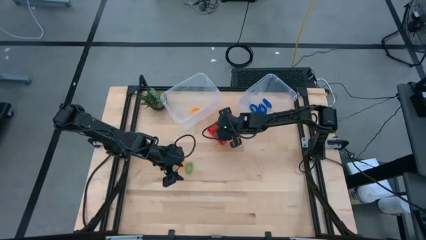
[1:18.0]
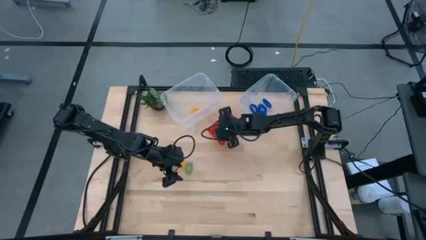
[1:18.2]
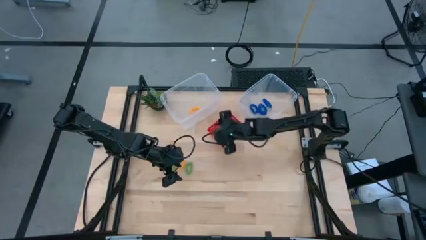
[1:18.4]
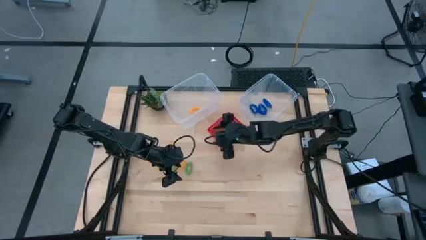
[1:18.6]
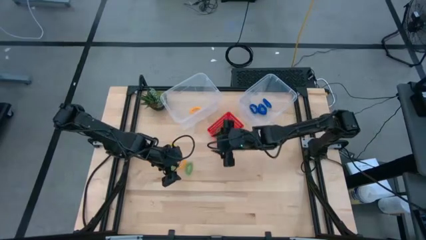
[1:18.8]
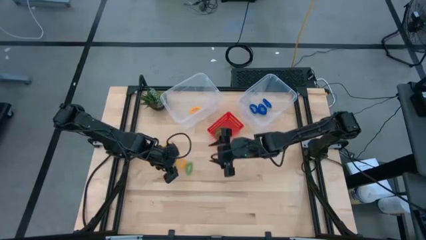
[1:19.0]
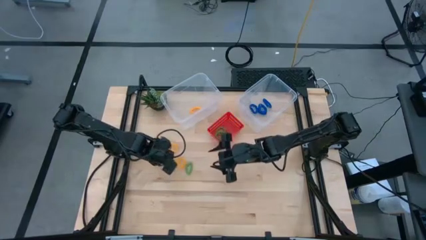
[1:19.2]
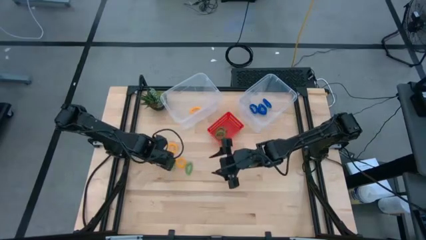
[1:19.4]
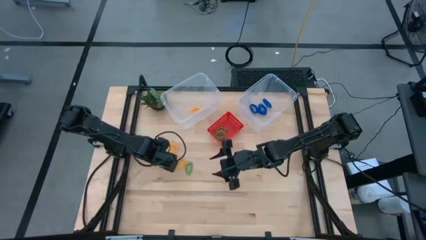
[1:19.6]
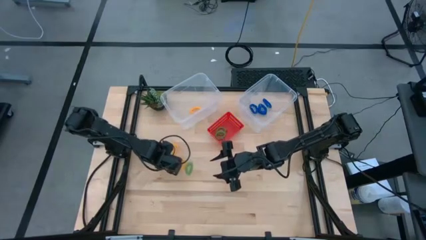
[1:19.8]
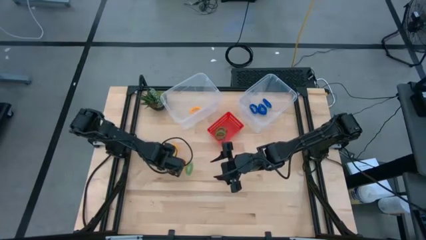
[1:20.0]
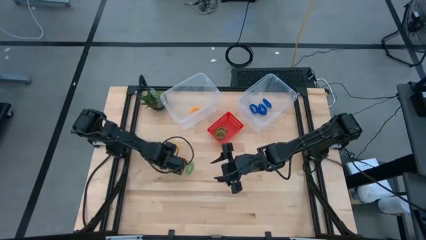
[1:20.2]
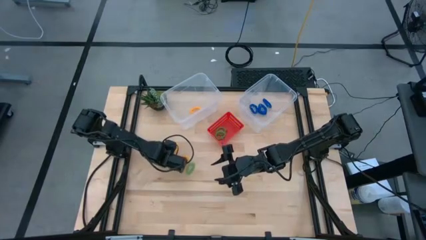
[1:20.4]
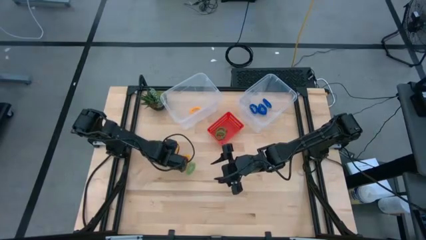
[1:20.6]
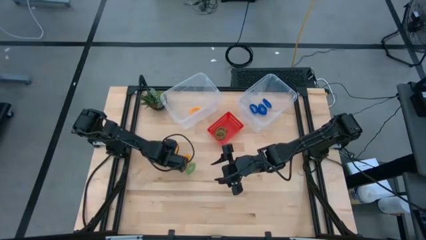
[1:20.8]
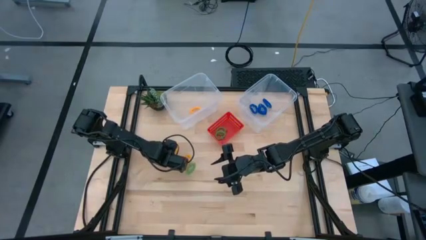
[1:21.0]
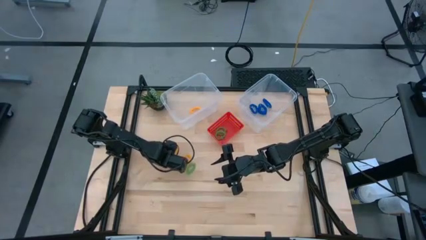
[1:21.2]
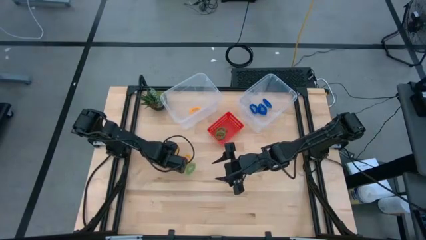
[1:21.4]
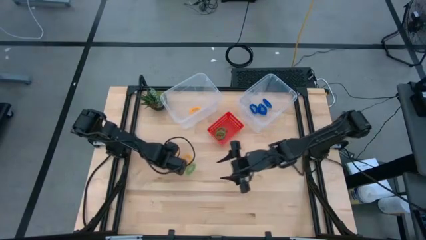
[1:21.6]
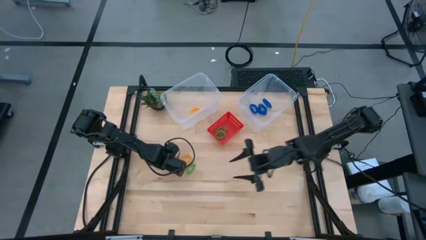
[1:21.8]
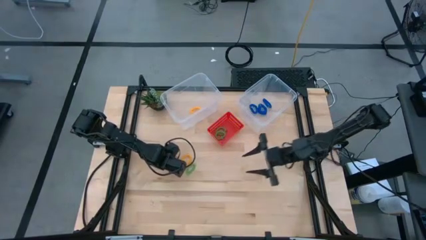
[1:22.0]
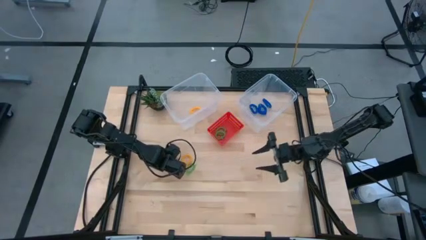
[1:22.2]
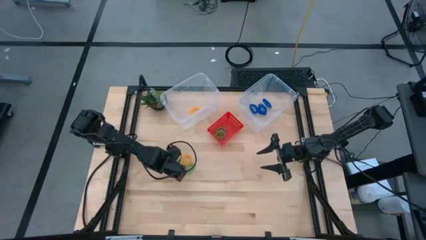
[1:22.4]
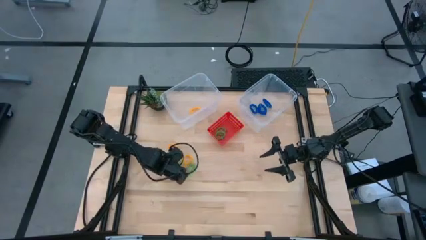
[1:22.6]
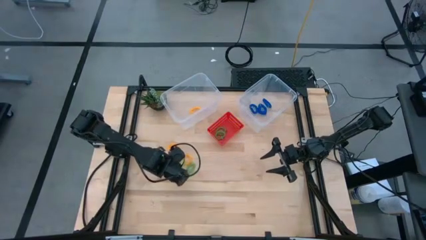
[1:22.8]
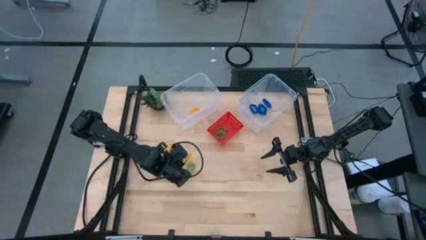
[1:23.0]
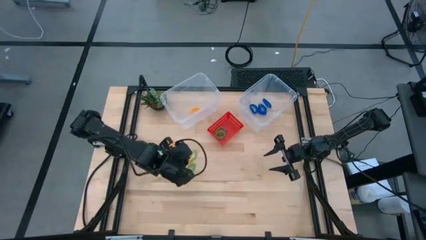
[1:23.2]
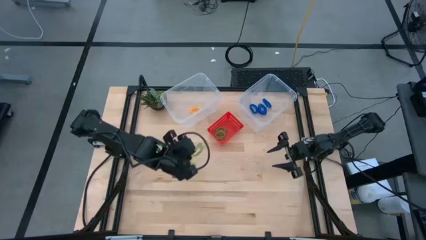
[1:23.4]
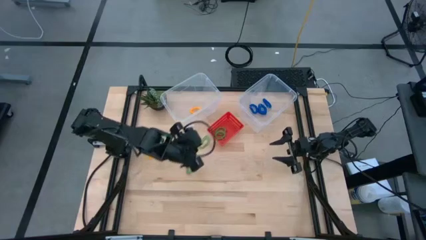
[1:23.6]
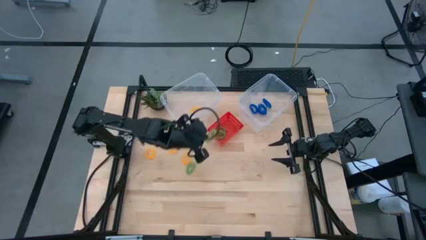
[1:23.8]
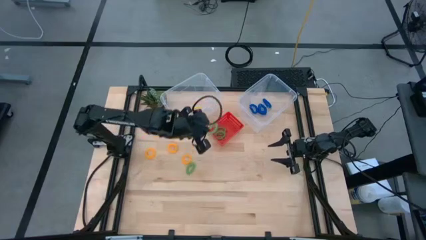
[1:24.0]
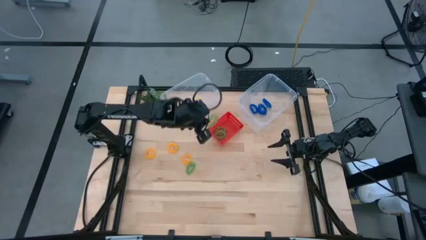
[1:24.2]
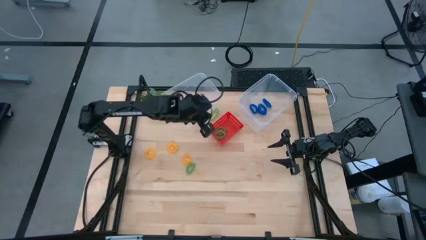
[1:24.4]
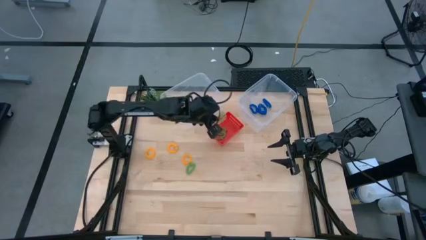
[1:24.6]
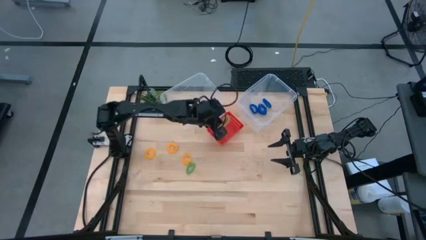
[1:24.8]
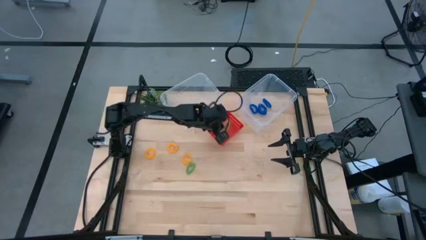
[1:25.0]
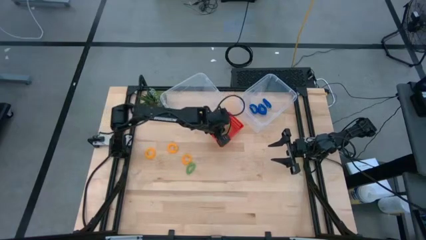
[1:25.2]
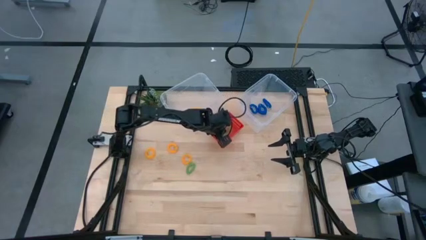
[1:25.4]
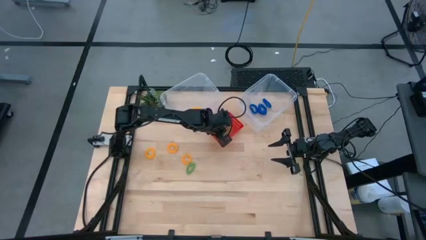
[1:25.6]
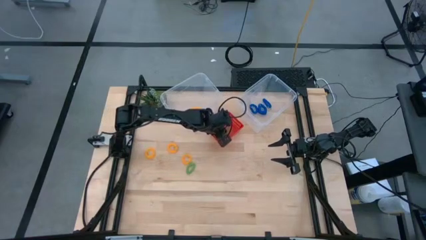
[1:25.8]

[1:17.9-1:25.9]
Task: Sort spring keychains
Put the green spring keychain into the red bin

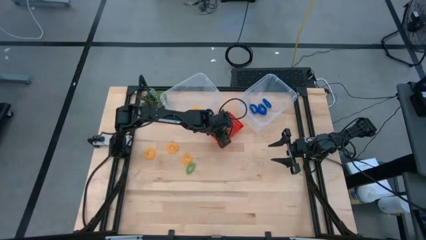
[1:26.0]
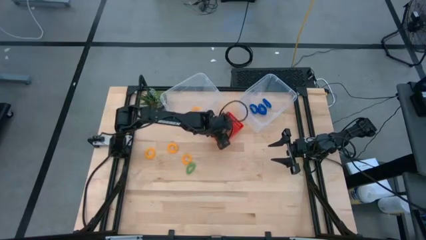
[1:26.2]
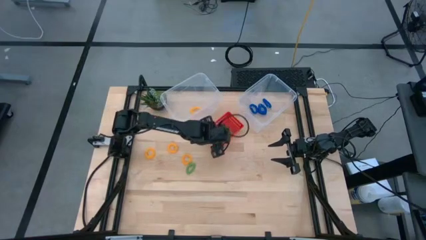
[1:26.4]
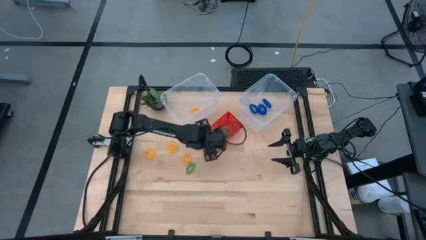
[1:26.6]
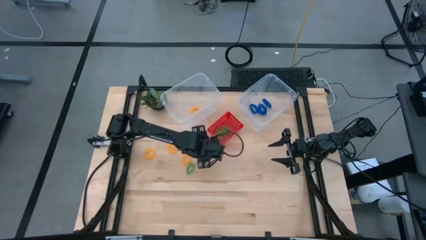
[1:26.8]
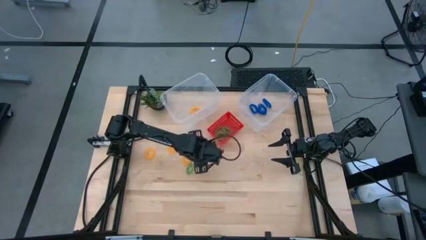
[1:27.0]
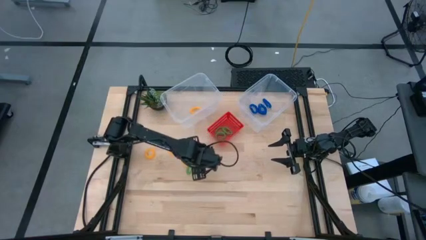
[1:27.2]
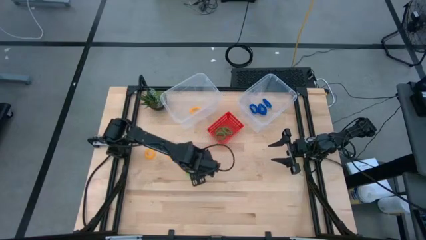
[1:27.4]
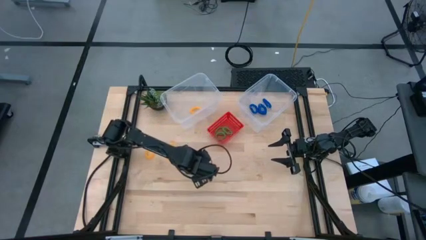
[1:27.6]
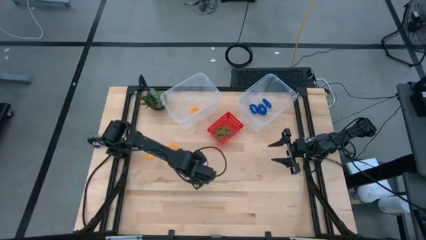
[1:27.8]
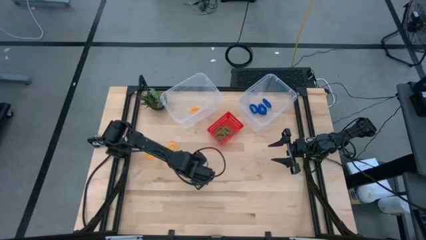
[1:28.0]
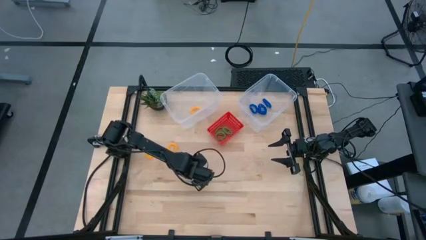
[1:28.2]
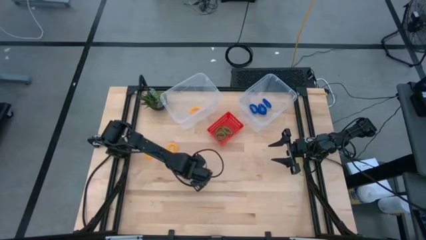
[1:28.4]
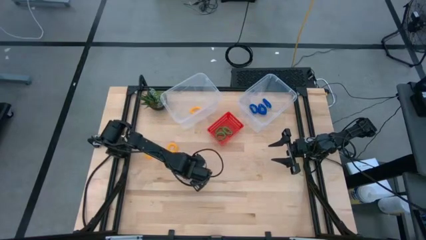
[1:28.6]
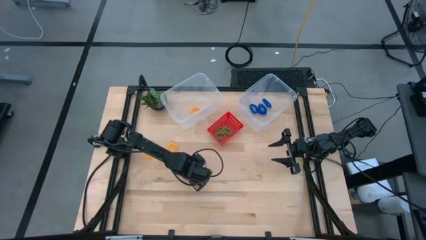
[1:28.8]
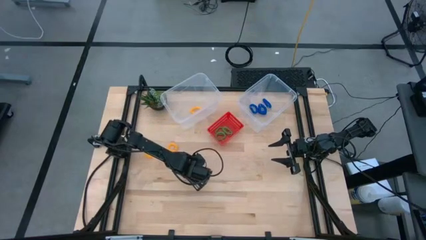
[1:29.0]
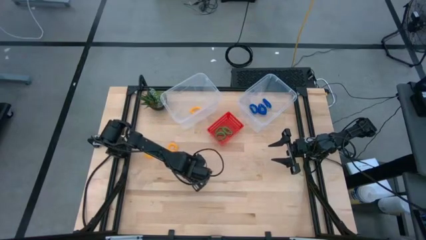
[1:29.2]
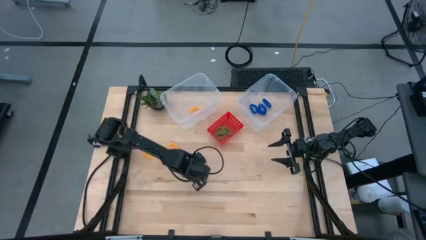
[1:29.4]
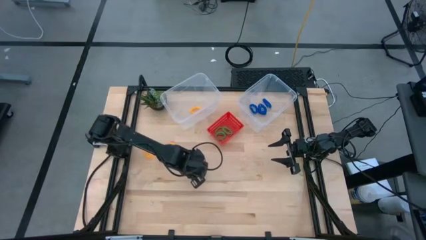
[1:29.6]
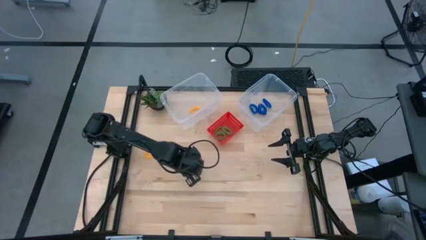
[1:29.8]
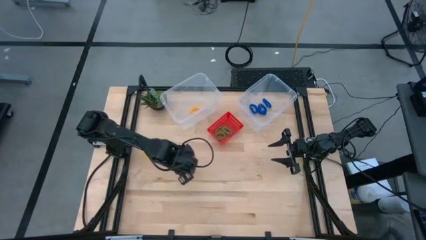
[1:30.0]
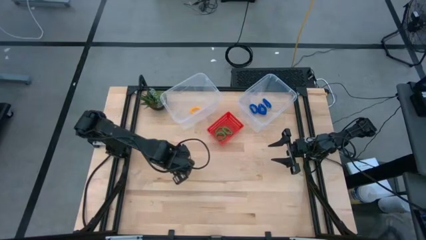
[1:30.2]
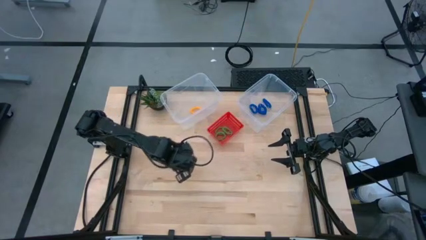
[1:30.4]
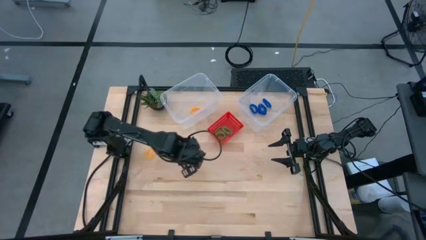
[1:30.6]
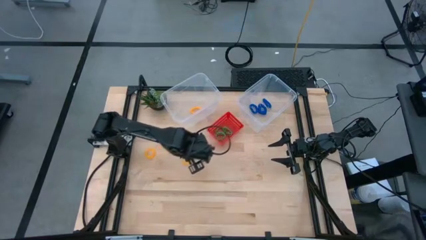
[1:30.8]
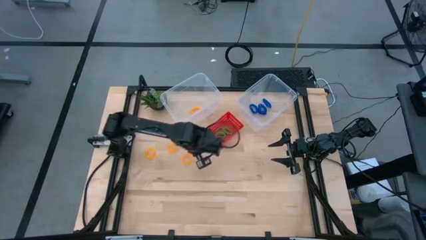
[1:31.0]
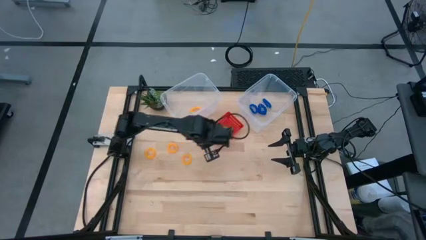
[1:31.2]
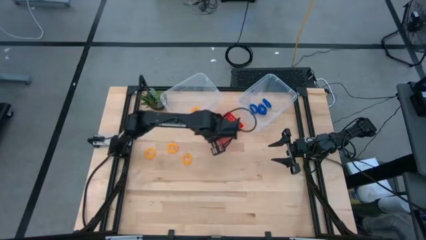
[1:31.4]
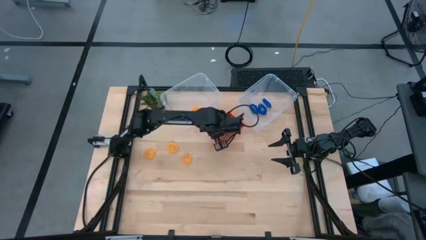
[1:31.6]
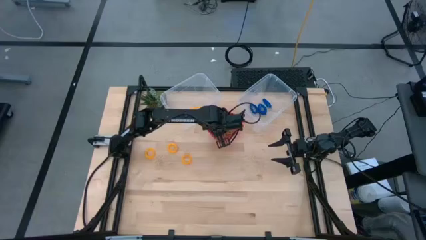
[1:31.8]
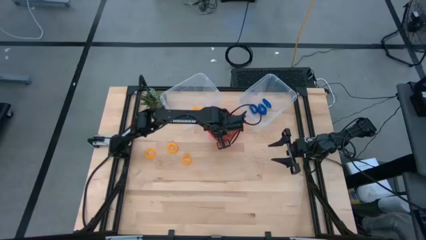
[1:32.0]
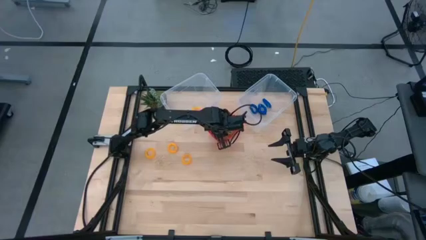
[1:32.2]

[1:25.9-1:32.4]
Put the green spring keychain into the red bin

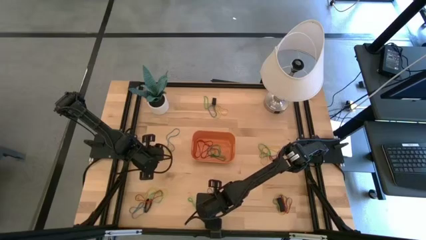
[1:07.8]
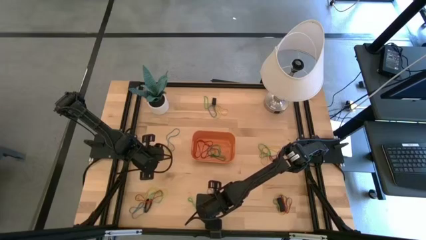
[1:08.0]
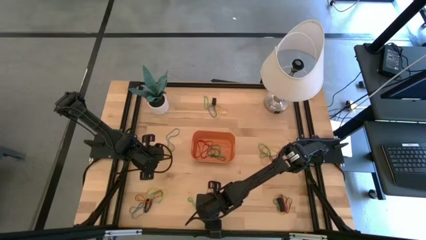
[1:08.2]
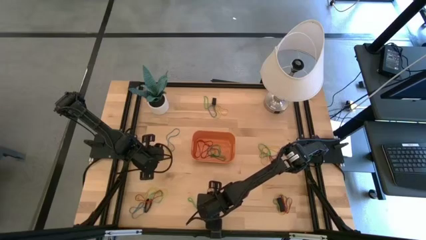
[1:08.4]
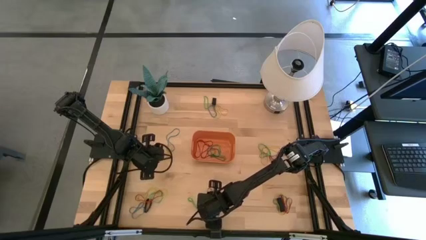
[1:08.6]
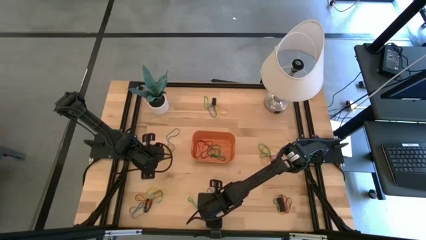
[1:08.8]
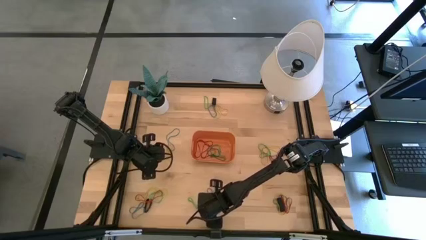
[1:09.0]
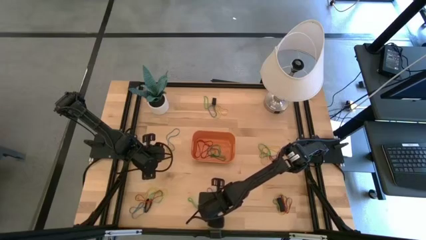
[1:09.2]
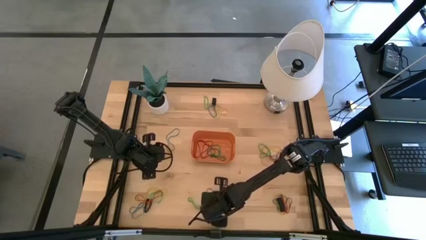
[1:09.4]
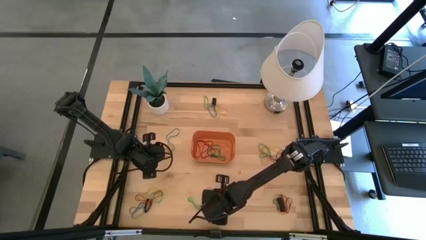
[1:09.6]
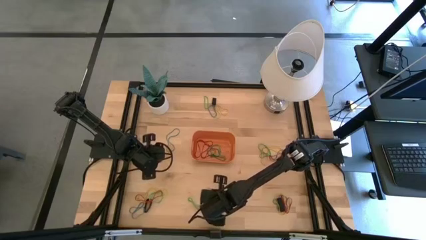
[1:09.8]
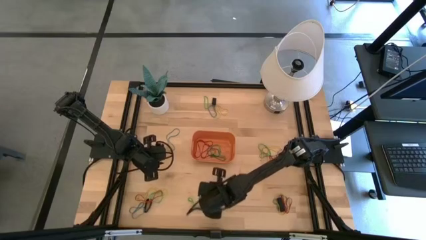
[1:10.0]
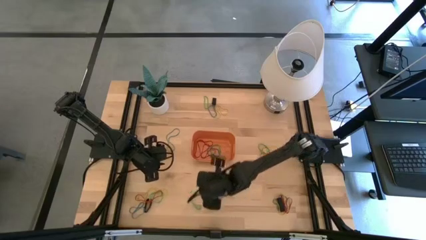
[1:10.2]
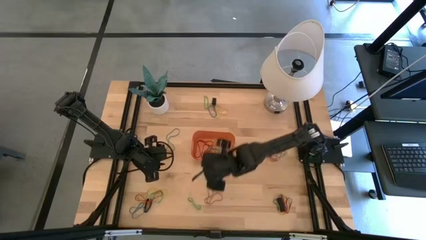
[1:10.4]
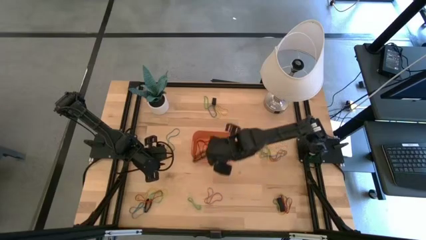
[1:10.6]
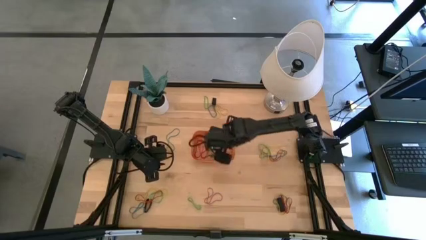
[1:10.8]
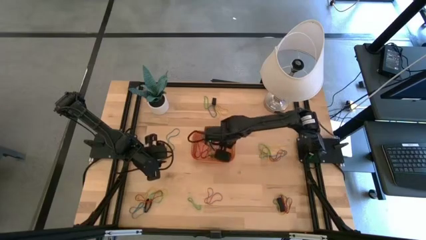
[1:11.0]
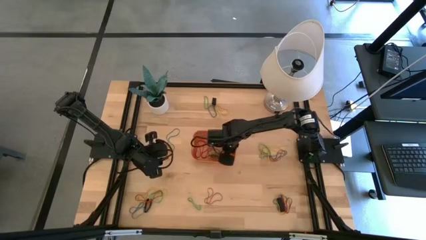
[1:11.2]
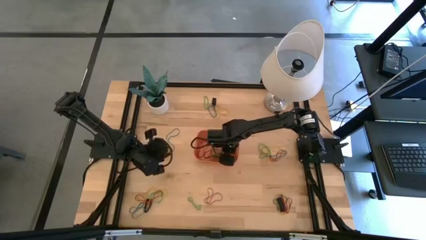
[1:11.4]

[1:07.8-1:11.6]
Task: Pick and place rubber bands into bin
Put the black rubber band into the orange bin
